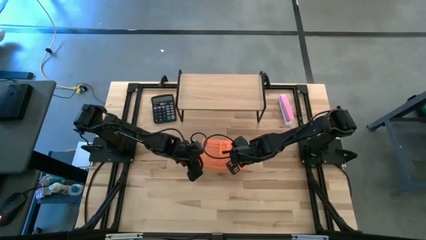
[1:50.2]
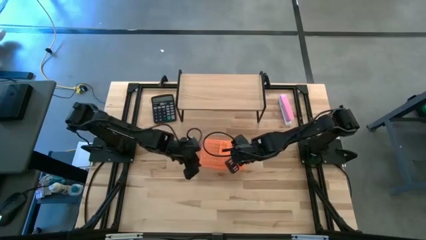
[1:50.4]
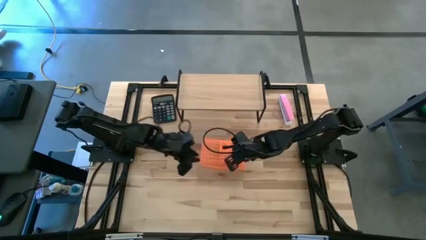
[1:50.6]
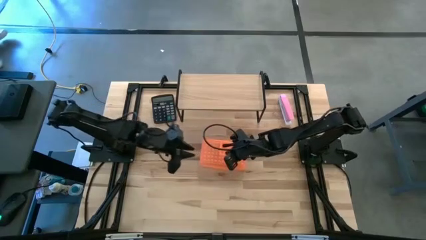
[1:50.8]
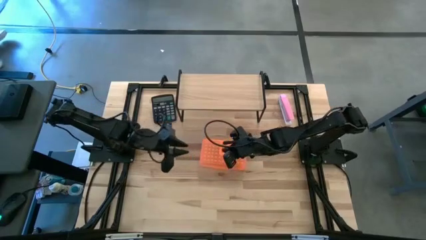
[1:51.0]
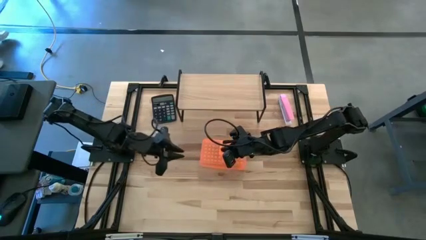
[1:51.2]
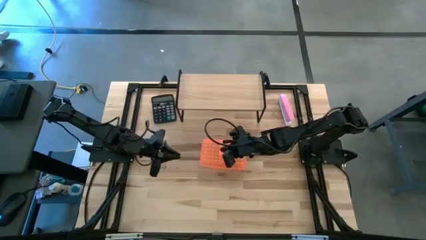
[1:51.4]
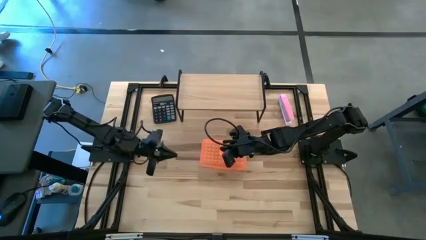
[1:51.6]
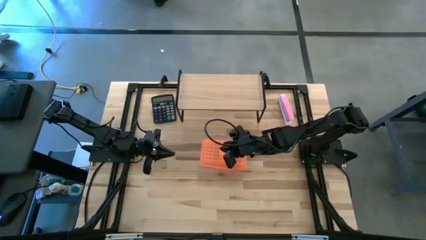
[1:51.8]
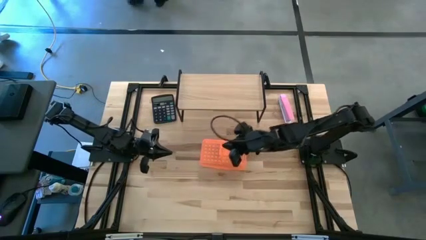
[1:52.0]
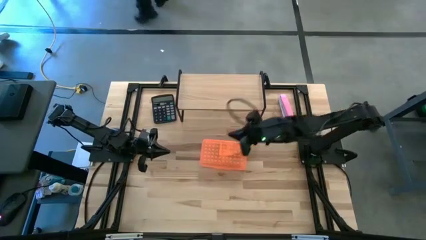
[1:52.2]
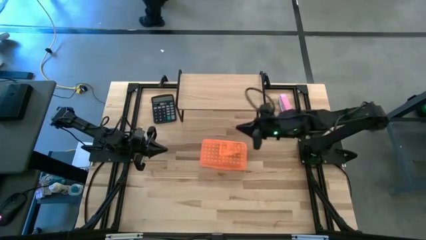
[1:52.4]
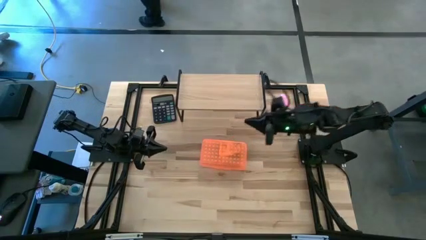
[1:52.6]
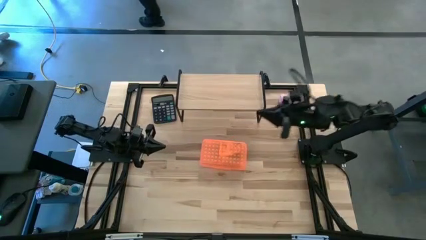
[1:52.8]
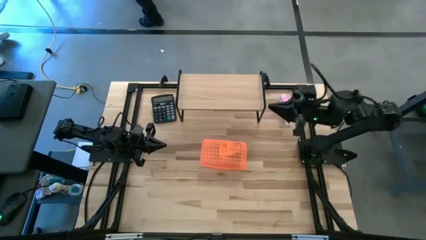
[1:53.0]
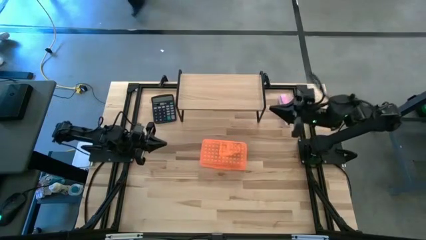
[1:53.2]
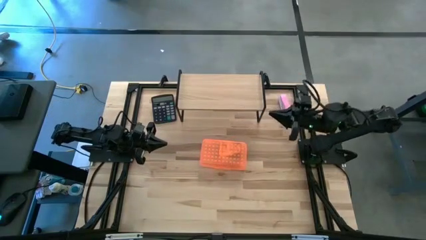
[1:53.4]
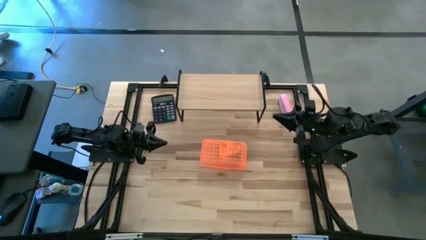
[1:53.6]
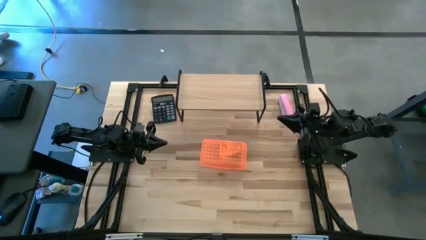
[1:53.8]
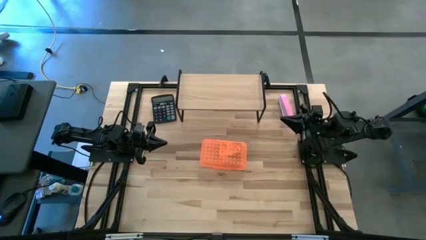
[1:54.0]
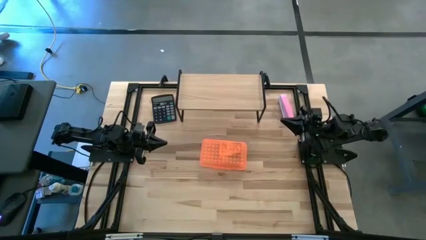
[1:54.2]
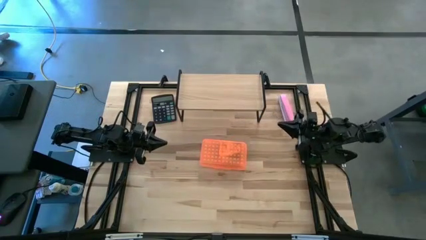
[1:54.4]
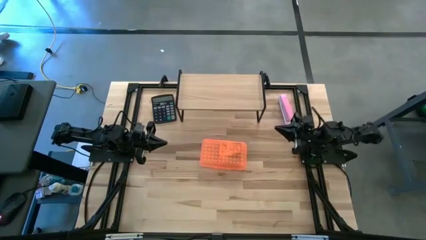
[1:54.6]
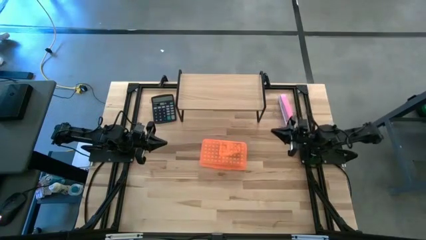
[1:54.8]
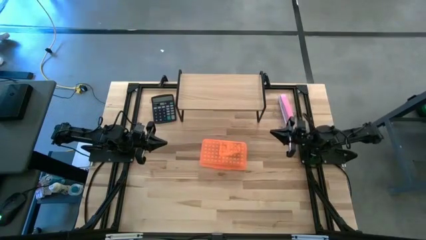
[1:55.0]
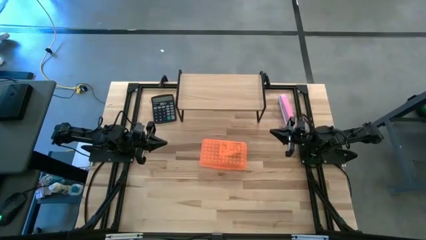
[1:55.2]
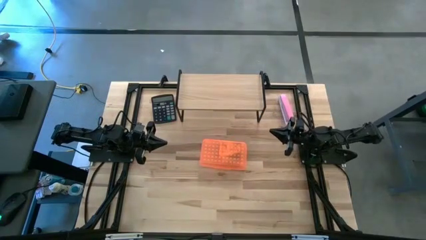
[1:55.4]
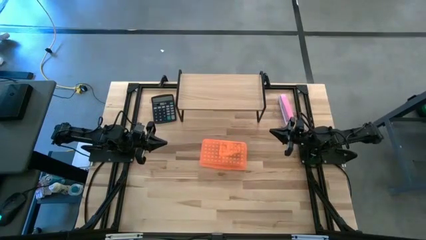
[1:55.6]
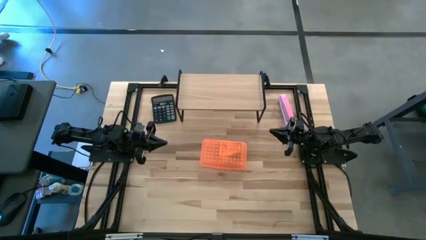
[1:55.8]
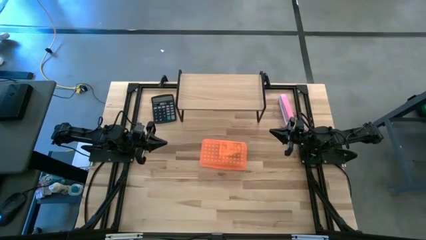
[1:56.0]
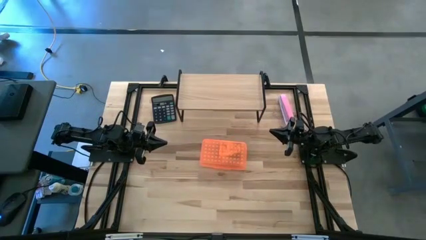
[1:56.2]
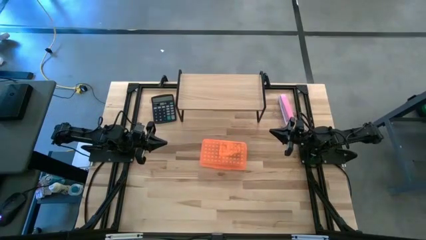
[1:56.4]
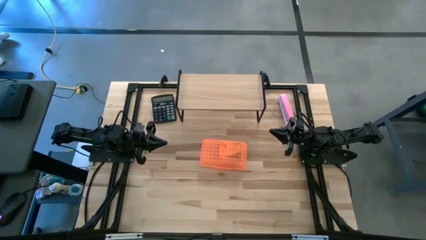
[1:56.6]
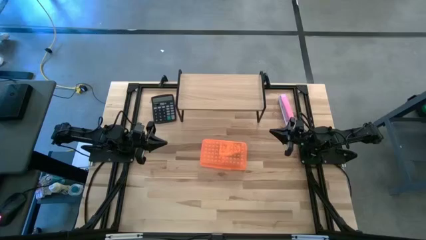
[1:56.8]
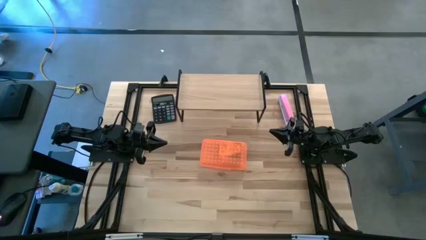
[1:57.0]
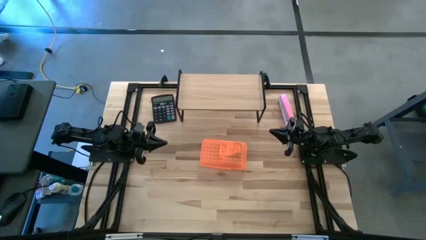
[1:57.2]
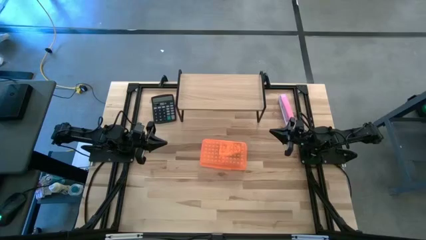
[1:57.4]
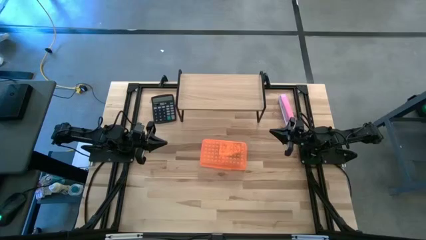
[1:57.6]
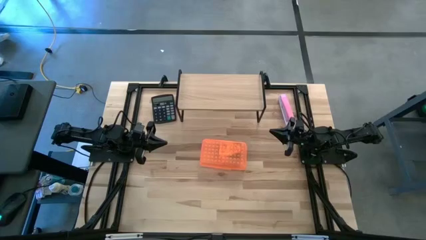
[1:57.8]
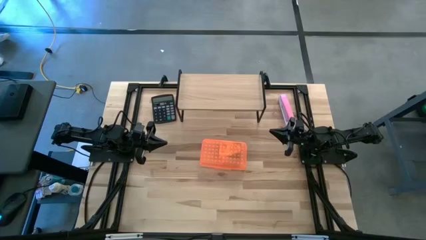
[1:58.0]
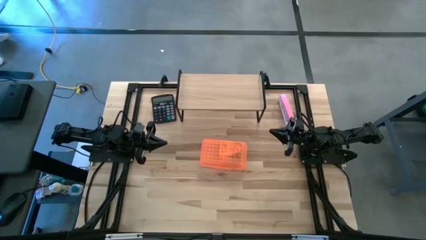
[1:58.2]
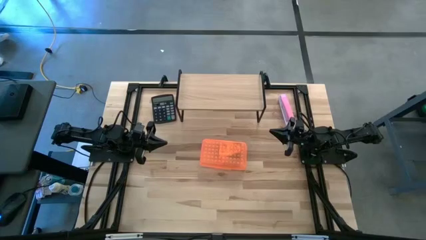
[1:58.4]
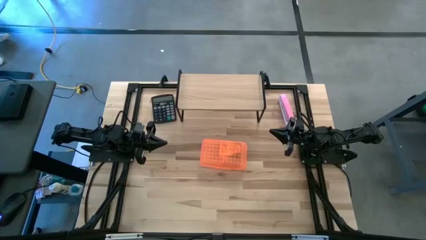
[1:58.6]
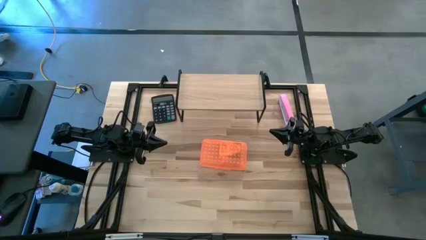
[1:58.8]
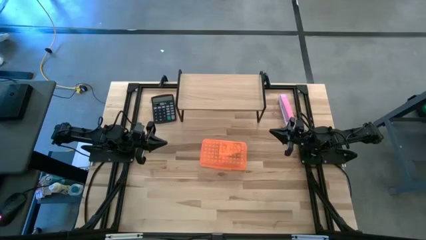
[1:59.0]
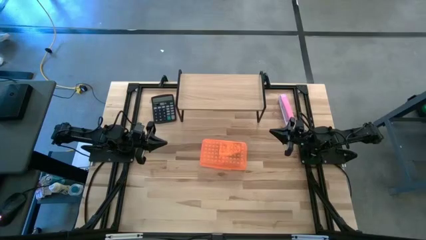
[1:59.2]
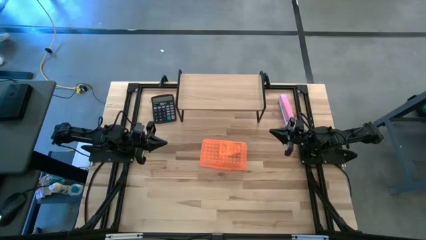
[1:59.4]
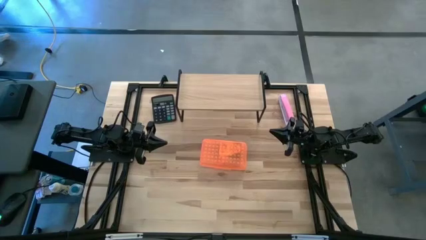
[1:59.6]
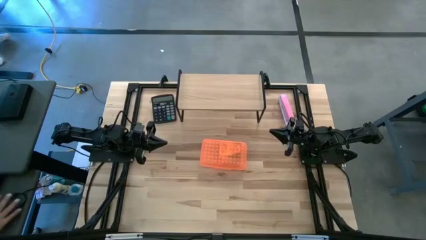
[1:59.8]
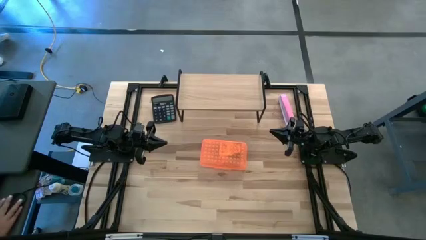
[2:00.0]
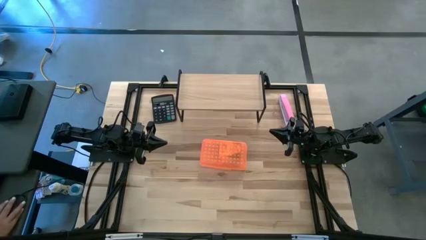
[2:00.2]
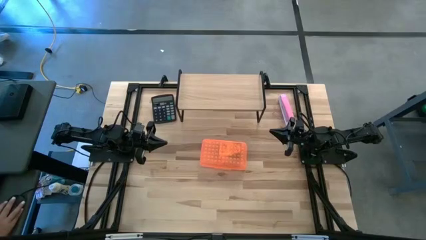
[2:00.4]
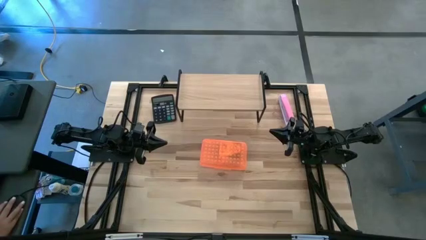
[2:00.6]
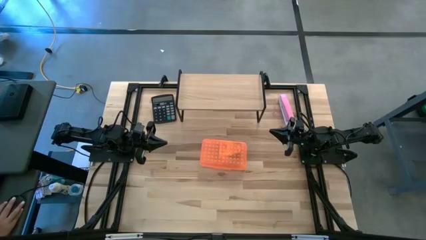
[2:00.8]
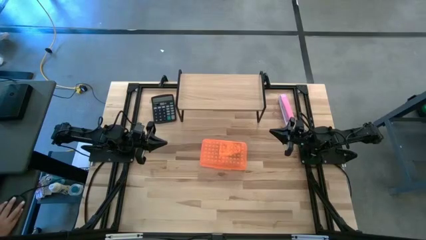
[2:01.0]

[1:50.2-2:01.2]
Task: Pack school essentials
Return to Home Position

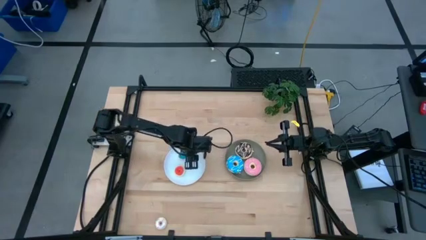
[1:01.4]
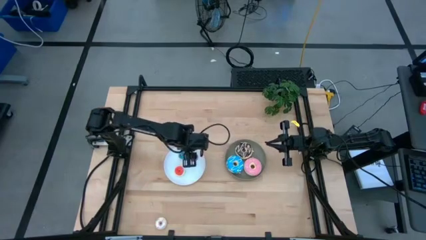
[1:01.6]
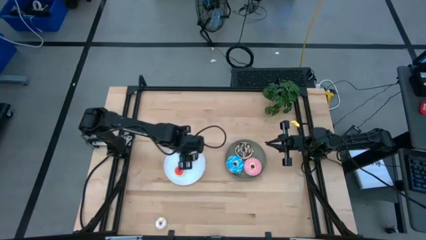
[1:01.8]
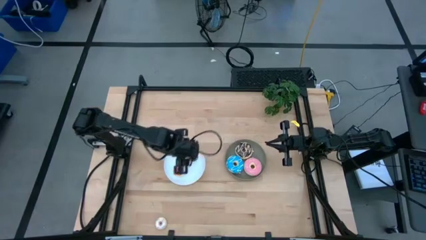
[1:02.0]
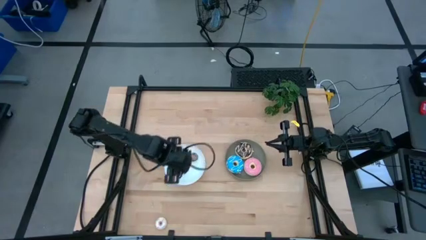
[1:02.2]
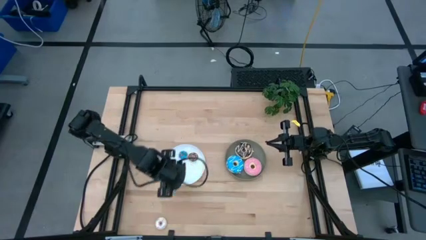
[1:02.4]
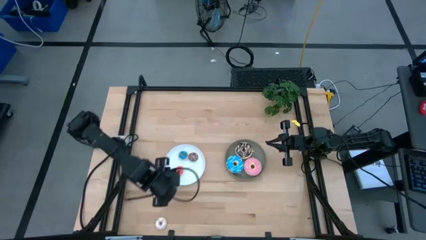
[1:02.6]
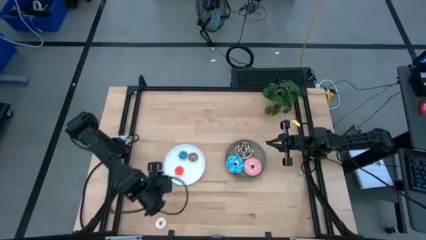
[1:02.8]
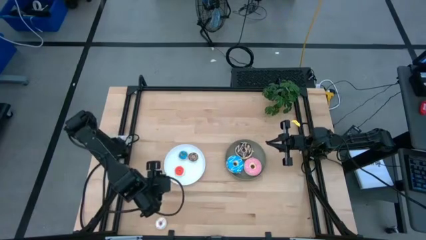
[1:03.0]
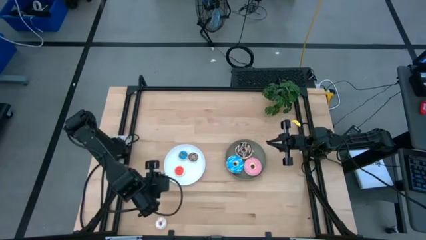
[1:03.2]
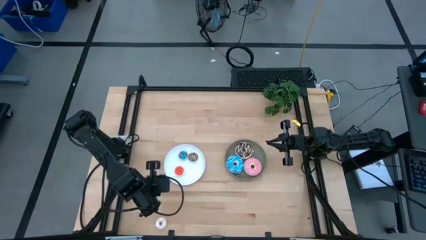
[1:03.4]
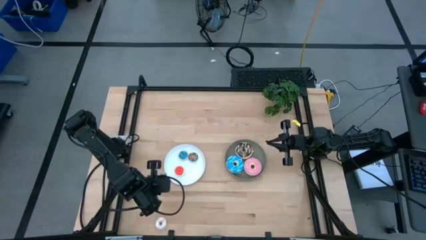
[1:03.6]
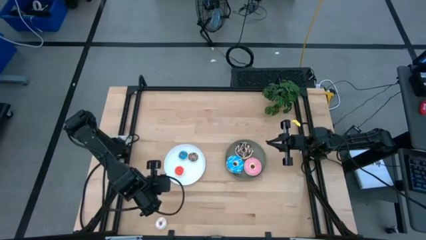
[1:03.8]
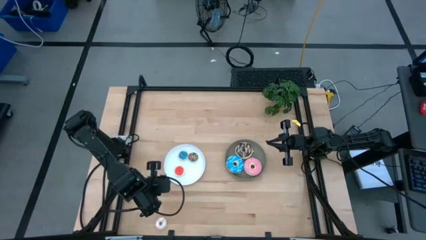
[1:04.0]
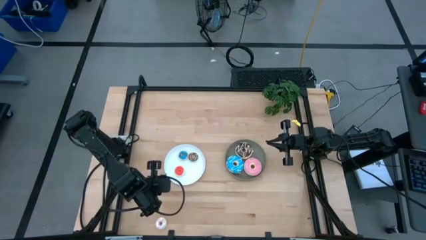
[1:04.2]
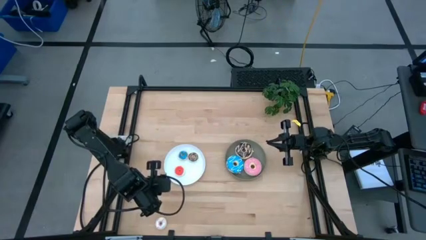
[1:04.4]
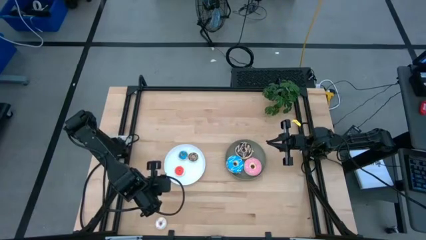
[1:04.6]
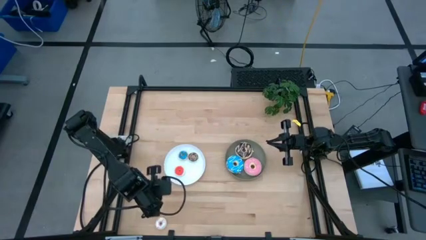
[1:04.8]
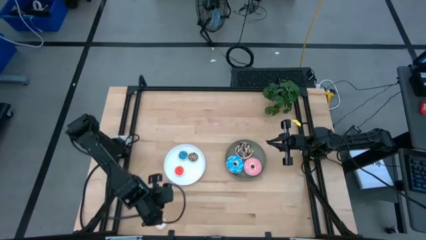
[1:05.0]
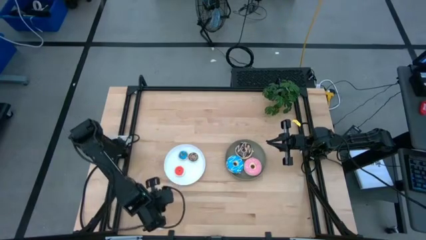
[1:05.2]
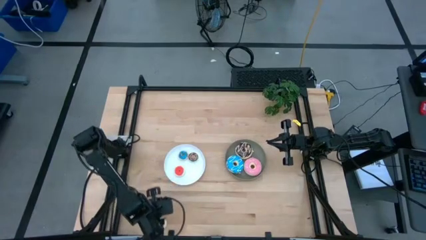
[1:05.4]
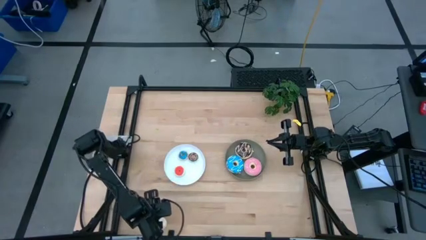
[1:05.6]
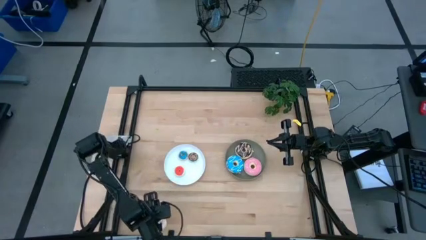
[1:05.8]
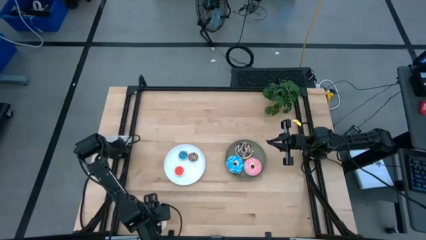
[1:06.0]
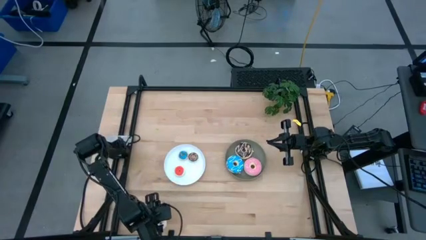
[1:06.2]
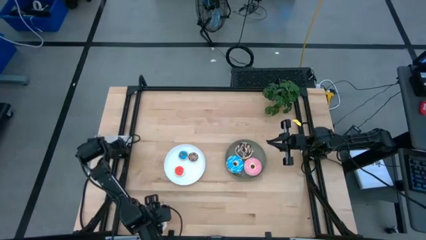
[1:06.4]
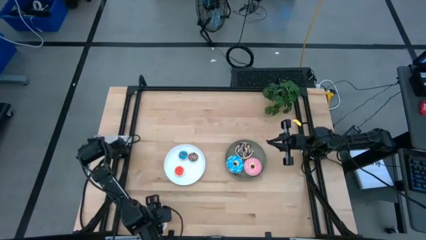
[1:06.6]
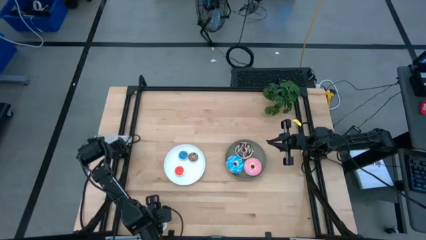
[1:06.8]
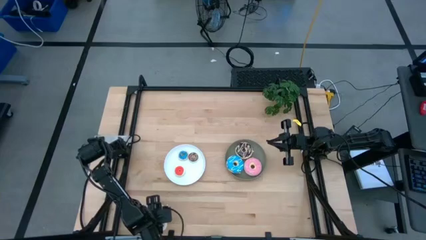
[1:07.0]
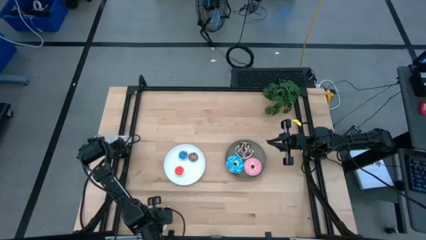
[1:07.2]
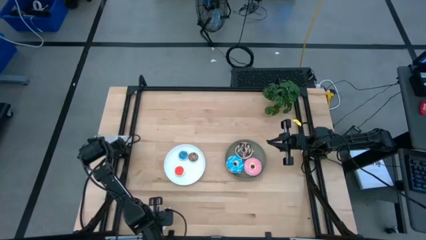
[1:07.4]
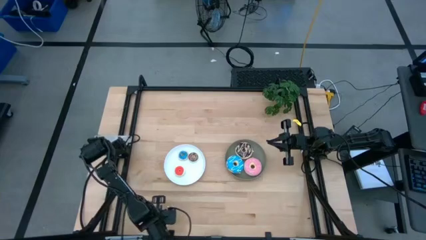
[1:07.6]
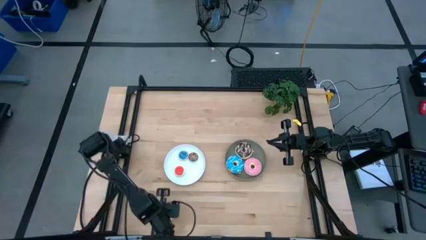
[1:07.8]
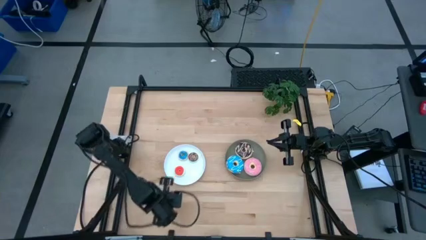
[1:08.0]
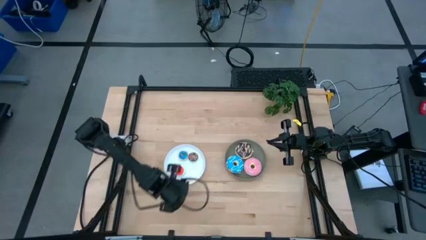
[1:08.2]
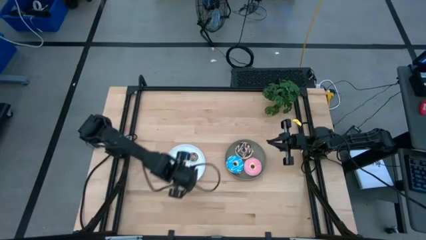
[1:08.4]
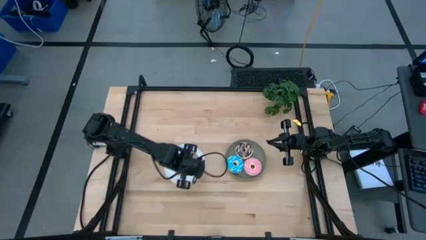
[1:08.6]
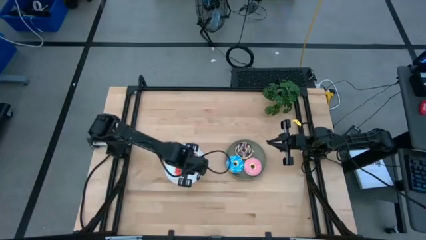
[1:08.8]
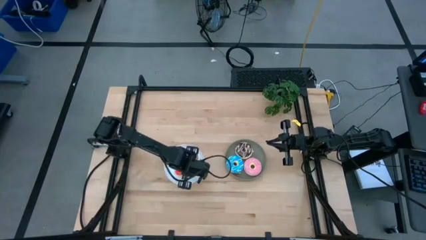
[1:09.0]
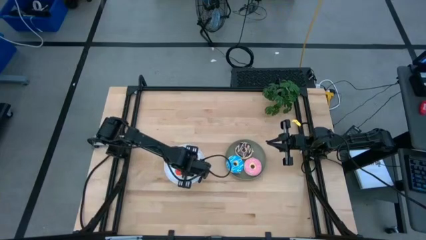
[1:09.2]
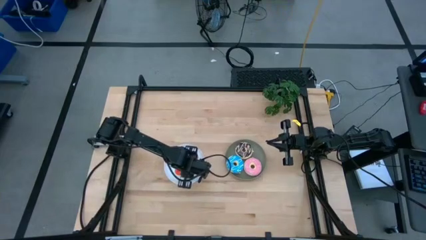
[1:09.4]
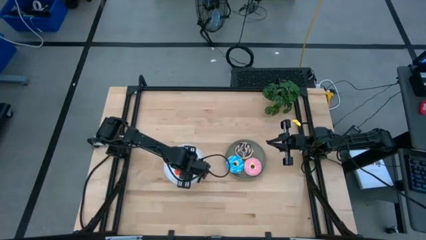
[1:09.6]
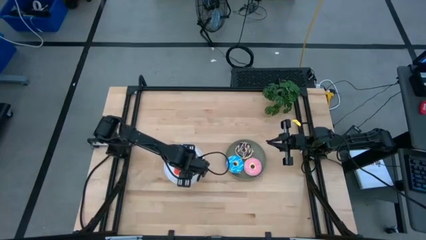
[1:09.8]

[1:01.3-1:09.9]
Task: Pick & Place donuts
Put the small white donut on the white plate
